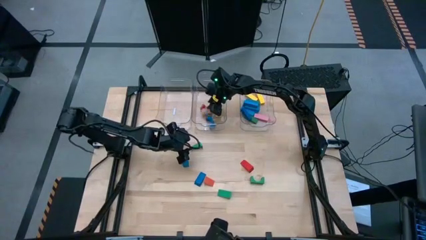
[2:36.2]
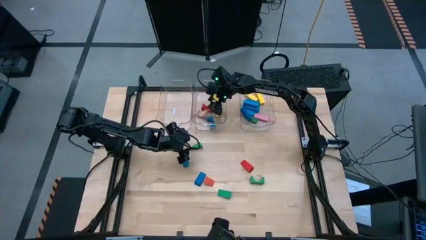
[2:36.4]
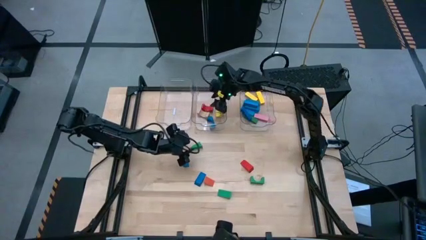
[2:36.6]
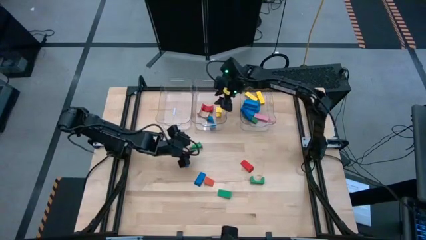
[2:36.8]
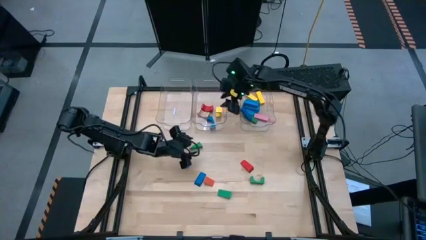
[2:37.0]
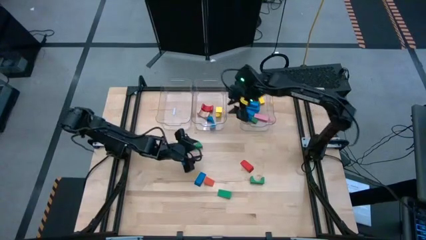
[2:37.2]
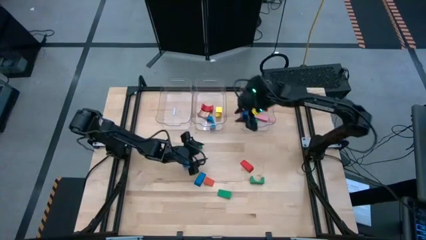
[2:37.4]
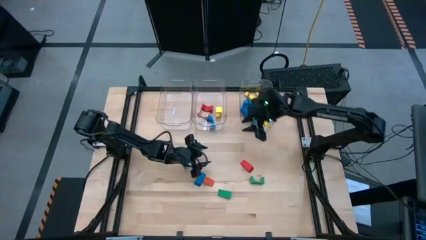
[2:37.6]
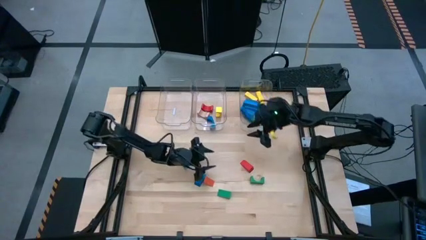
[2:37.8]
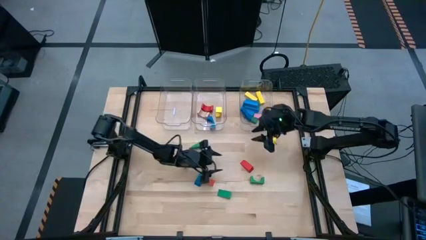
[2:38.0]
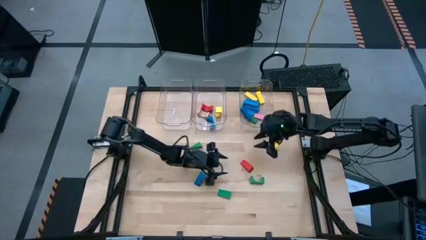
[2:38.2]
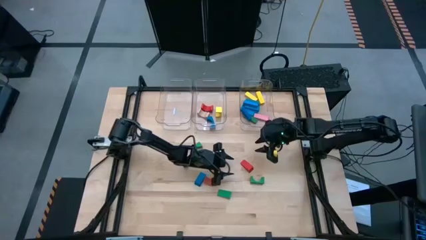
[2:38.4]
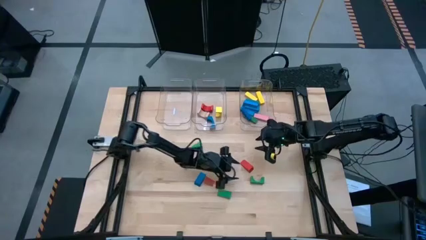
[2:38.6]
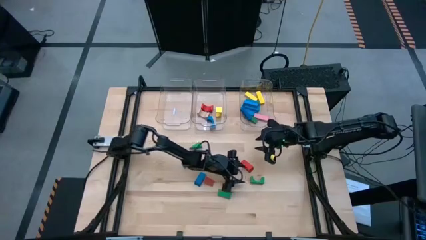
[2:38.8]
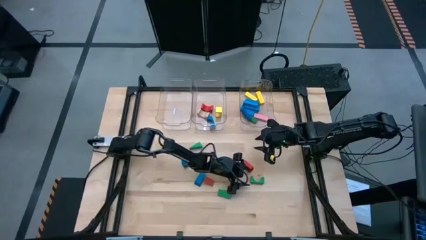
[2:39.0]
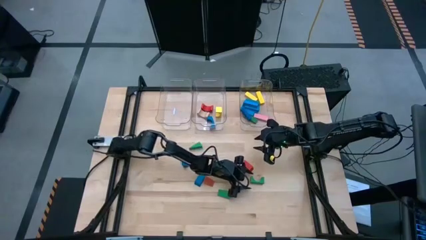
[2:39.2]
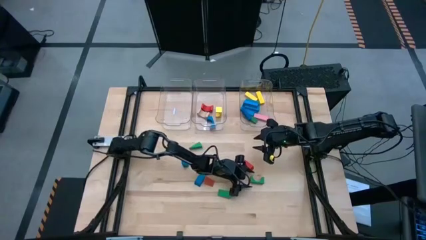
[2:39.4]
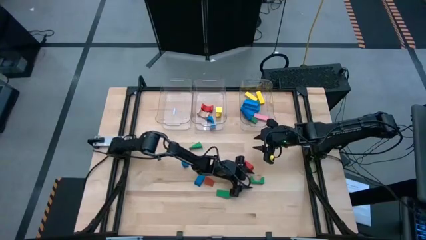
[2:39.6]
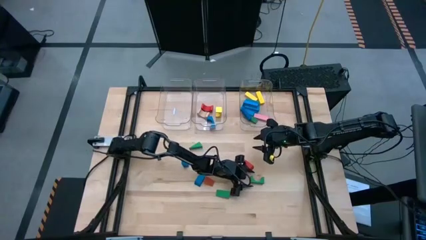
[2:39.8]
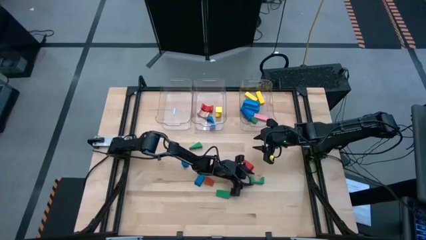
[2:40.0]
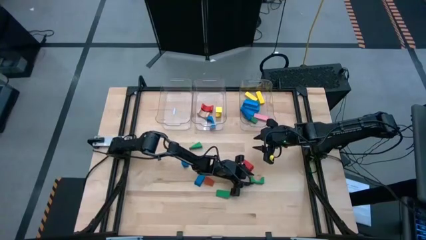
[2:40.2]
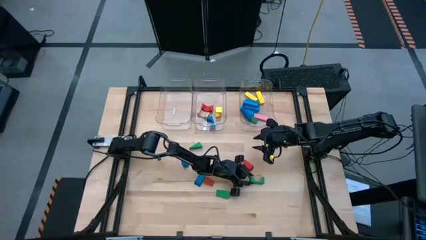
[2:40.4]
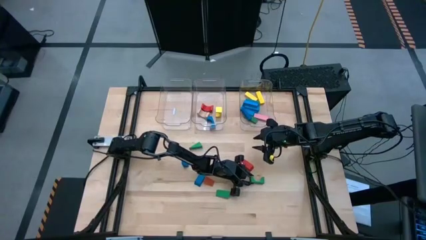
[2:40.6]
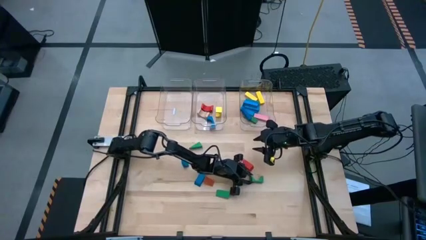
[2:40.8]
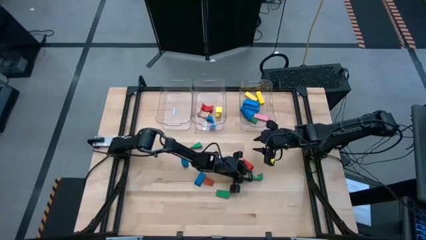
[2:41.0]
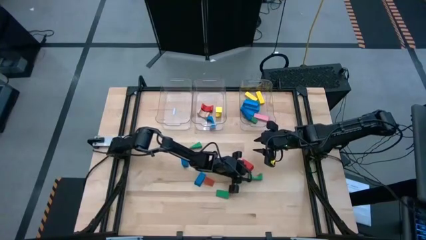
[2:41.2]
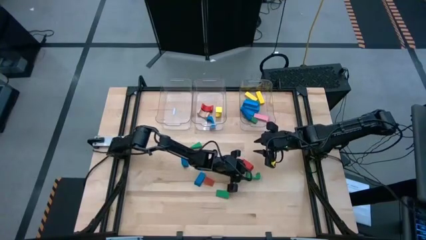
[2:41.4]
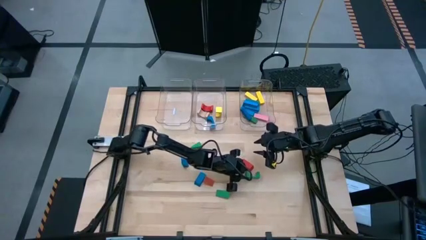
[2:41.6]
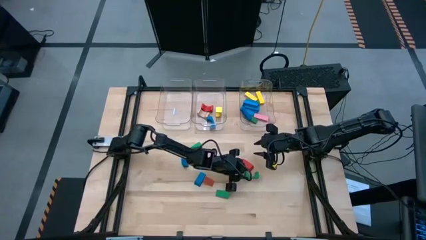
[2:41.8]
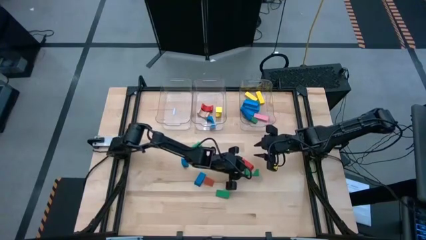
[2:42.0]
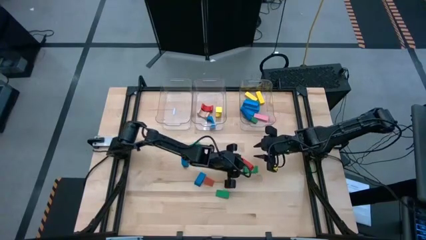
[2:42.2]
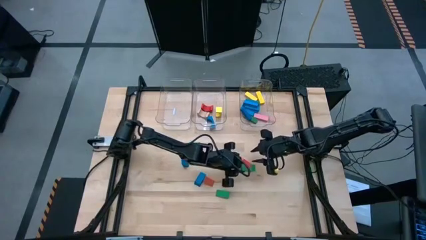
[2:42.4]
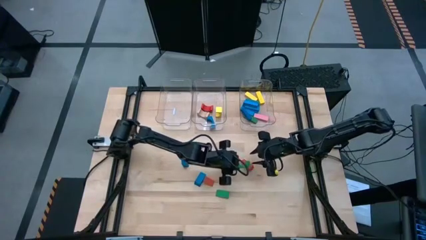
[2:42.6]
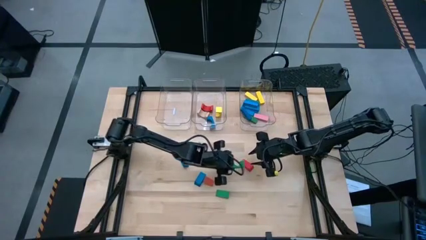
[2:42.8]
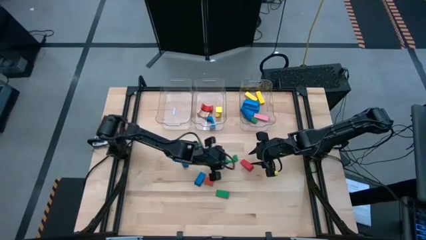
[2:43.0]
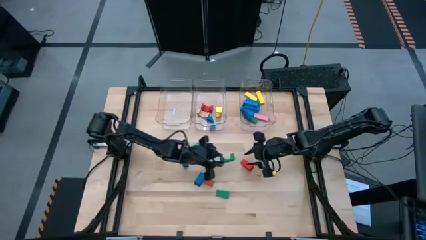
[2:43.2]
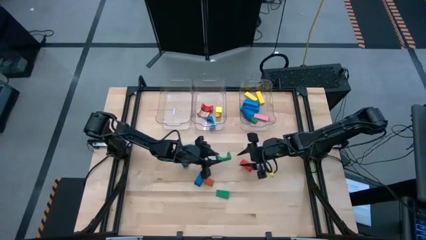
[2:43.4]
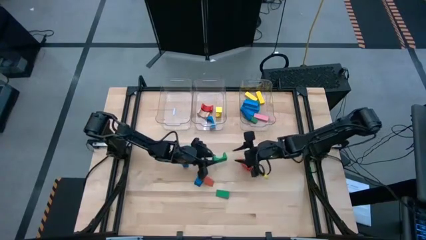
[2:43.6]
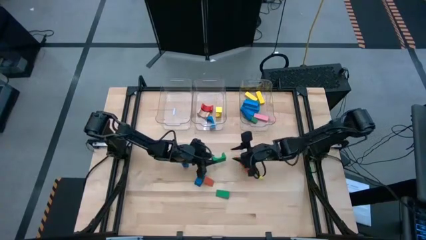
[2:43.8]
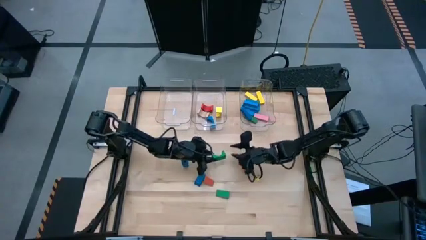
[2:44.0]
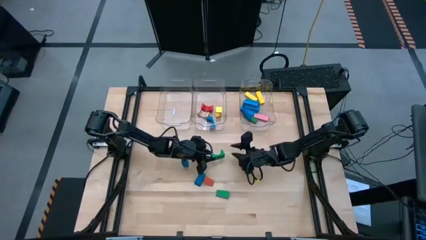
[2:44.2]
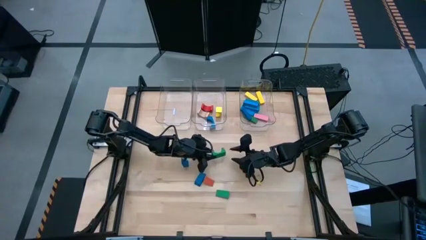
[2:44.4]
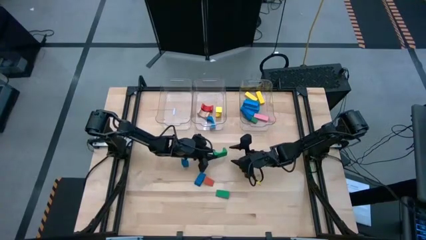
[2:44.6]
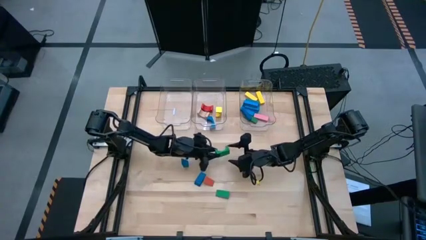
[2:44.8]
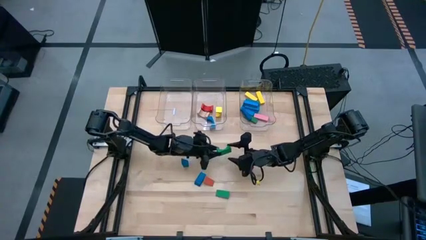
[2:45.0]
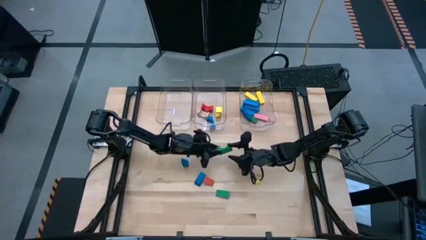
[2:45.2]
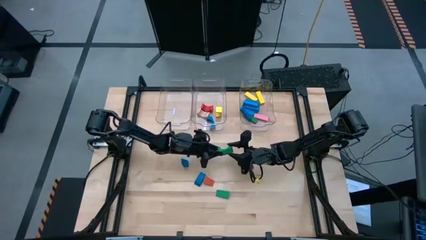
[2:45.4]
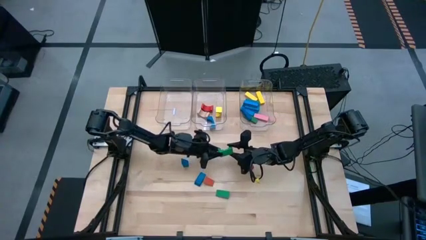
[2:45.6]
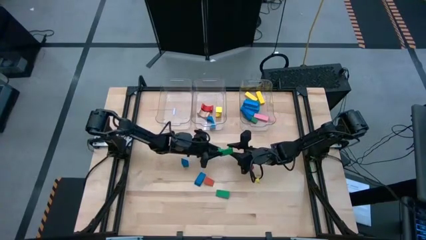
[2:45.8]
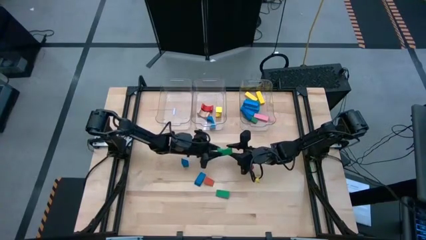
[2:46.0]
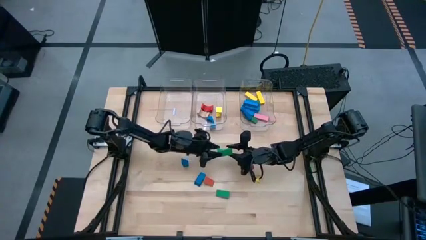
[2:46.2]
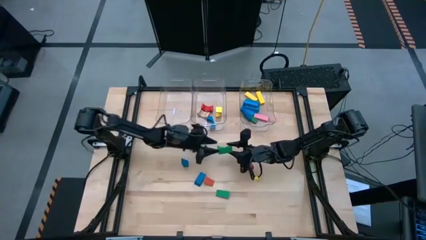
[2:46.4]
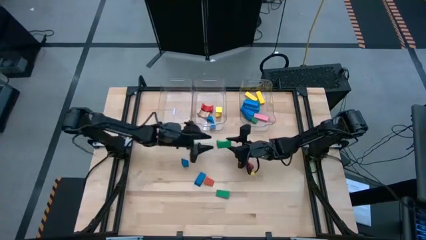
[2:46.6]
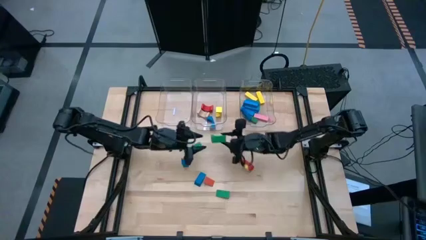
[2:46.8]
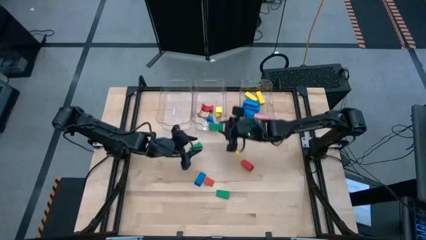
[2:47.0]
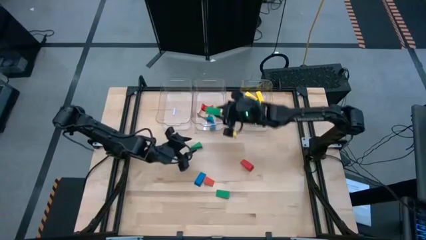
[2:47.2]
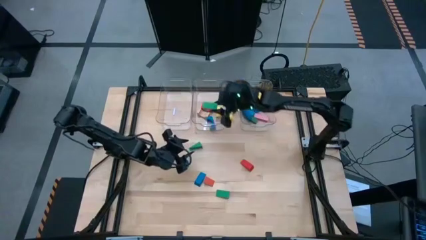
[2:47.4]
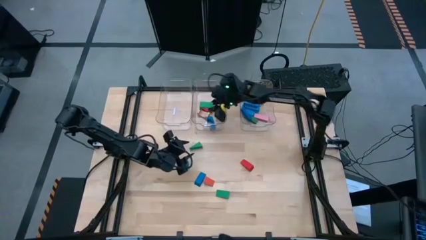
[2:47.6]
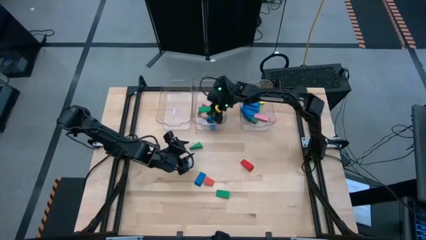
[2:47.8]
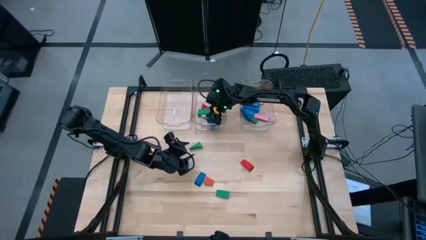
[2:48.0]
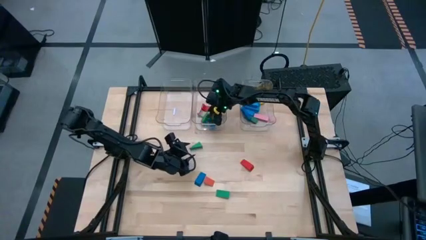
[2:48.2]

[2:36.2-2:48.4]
Task: Sort blocks by size
Put the green arch block into the center transparent bin

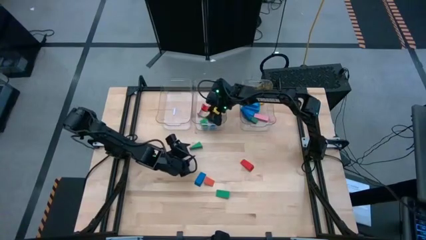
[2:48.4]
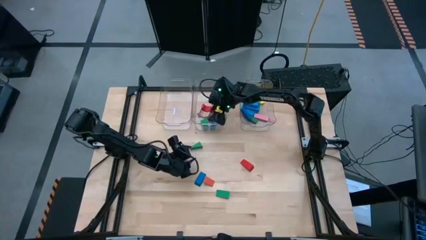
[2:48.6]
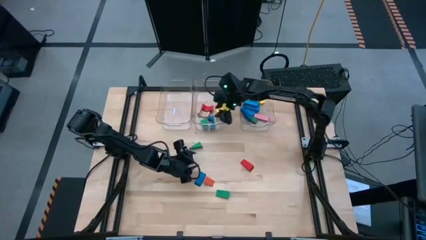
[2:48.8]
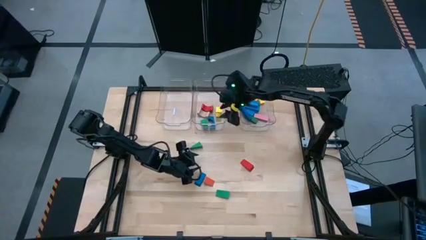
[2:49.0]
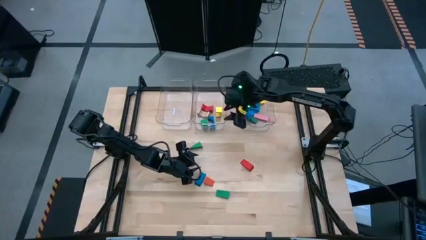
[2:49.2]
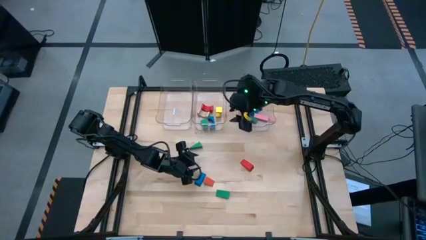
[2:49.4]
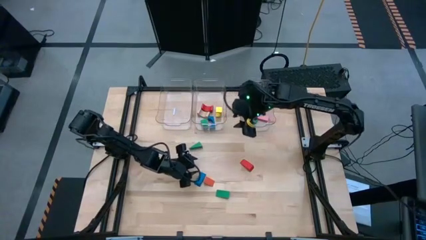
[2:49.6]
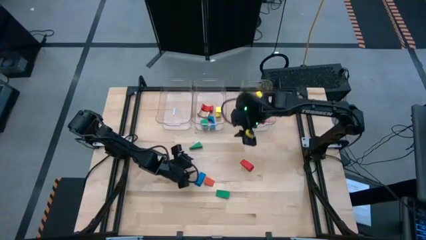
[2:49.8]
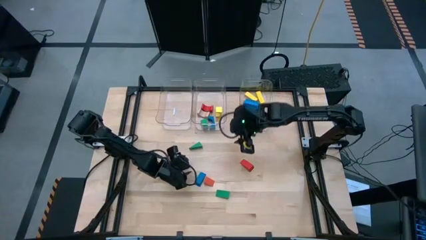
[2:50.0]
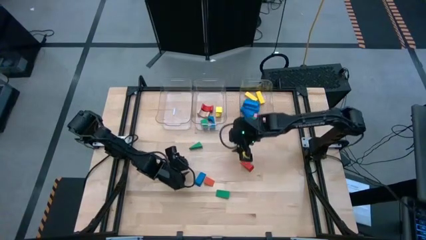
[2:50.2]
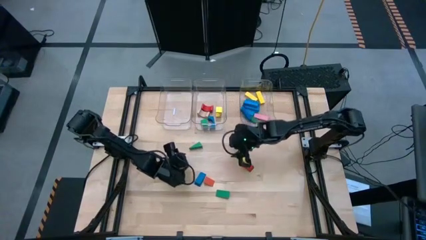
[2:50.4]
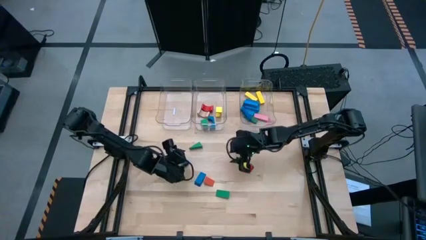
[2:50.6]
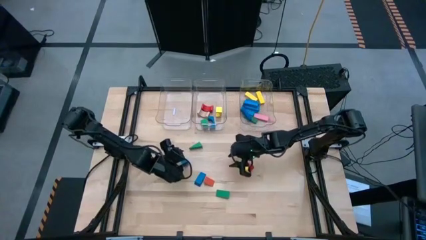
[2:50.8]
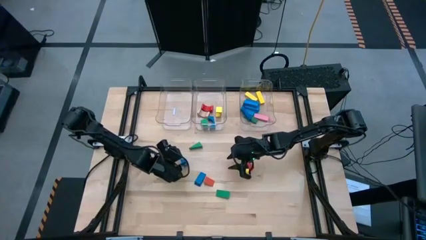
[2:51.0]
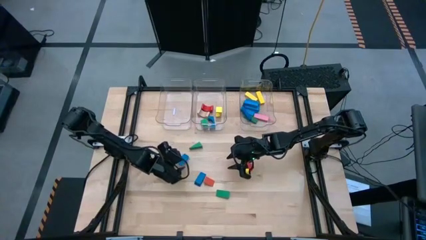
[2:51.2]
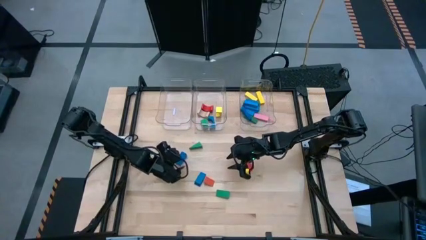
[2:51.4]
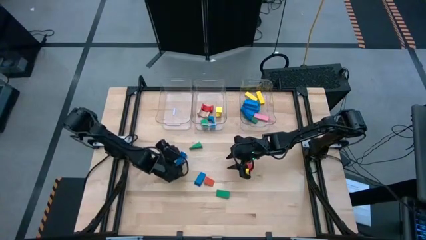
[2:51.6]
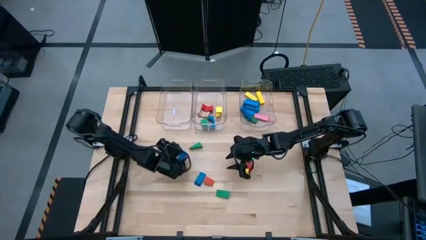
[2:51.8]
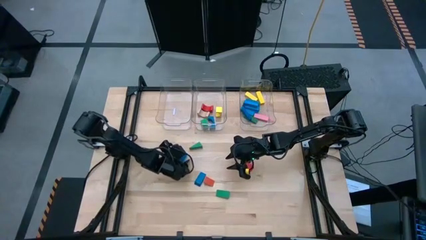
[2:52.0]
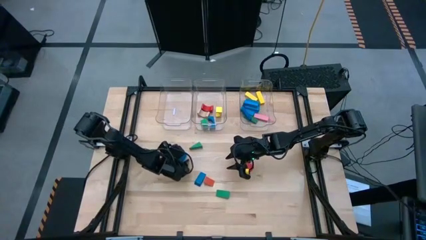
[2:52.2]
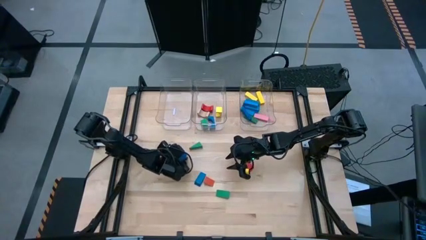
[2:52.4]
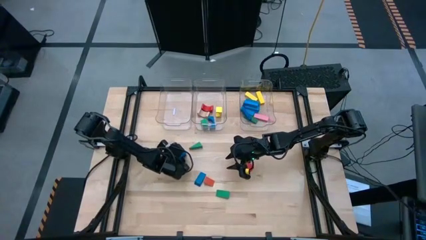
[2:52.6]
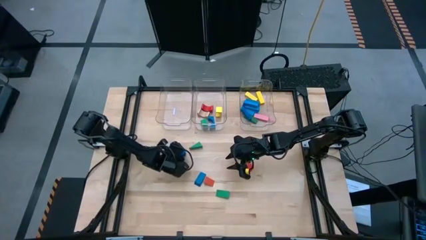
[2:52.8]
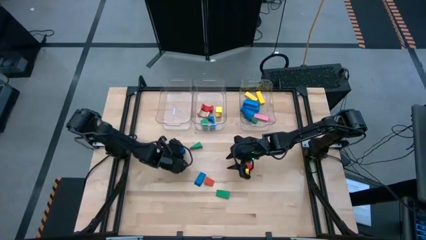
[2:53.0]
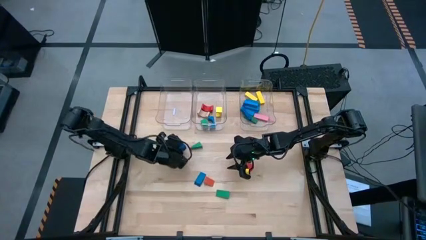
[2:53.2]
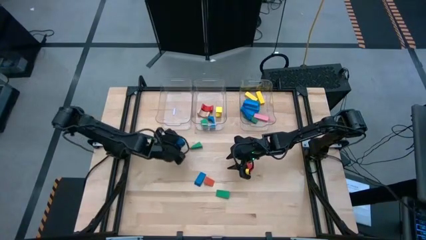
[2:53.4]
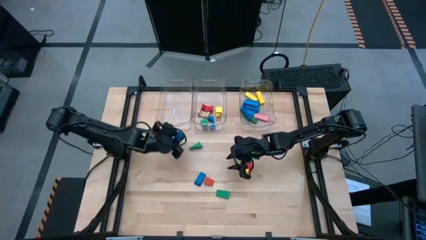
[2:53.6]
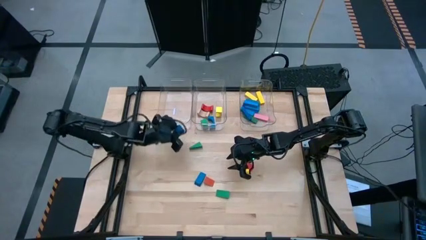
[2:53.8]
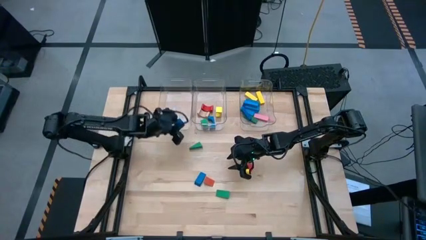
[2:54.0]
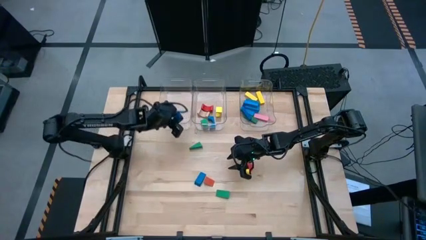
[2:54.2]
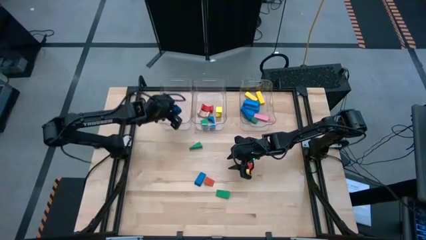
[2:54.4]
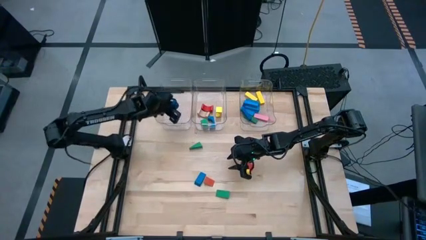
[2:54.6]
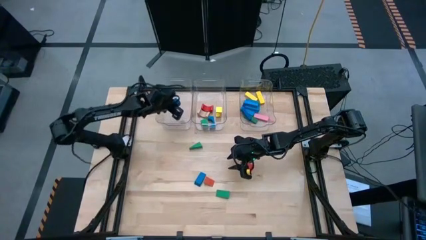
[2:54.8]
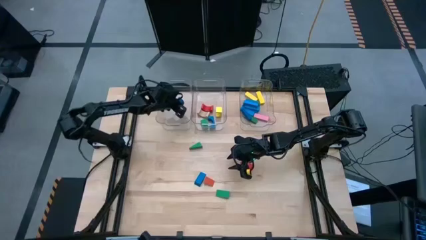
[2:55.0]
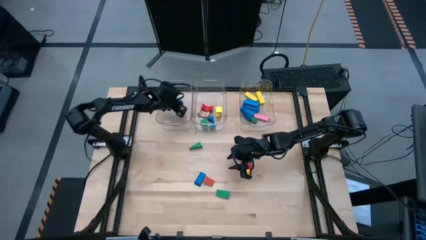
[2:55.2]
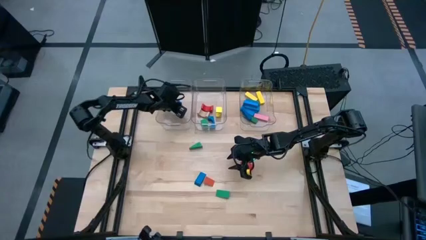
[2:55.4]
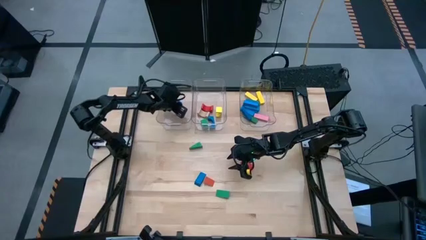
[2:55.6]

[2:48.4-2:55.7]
Put the blue triangular block into the left transparent bin
